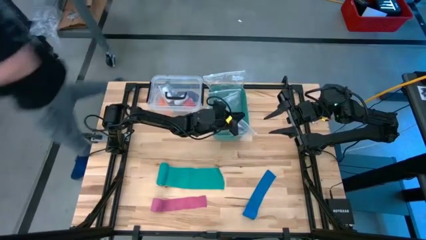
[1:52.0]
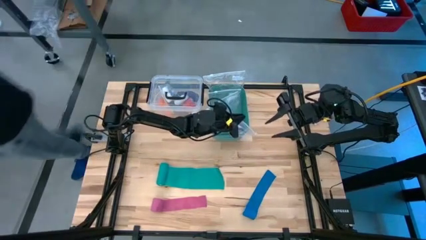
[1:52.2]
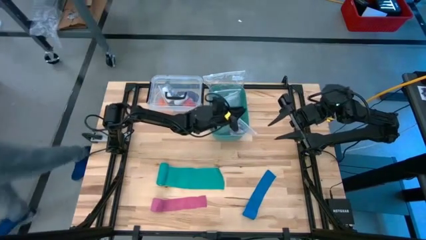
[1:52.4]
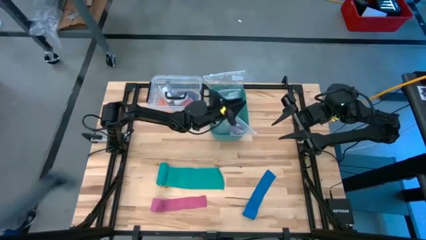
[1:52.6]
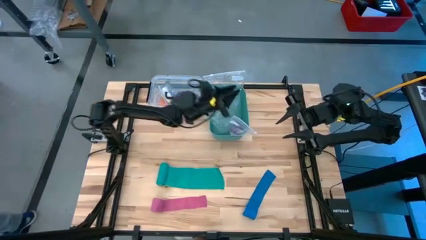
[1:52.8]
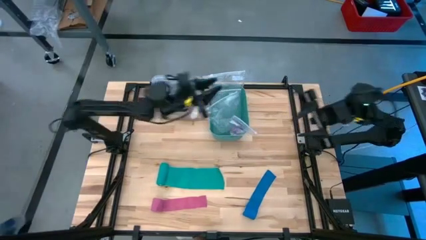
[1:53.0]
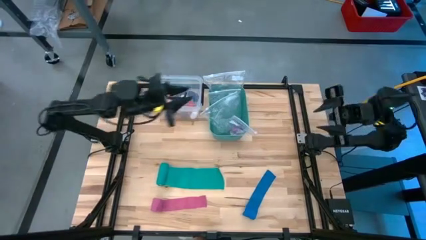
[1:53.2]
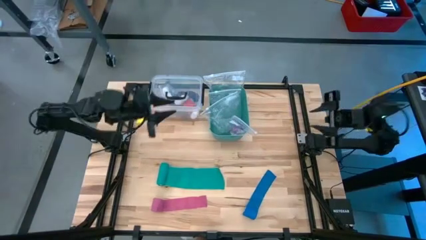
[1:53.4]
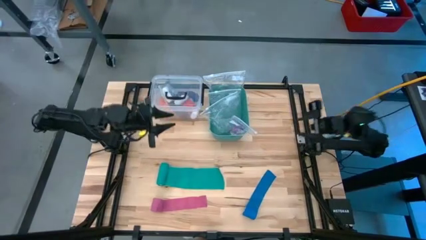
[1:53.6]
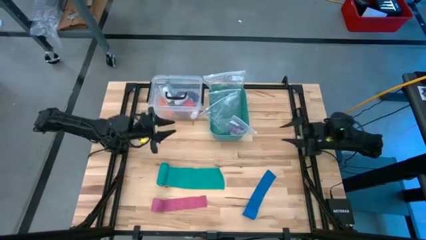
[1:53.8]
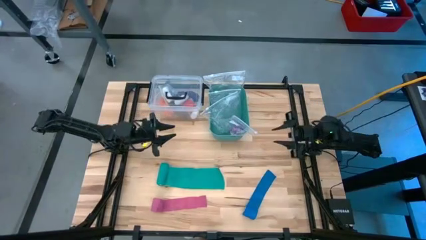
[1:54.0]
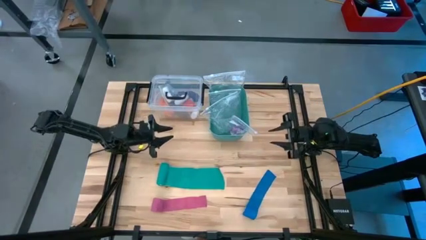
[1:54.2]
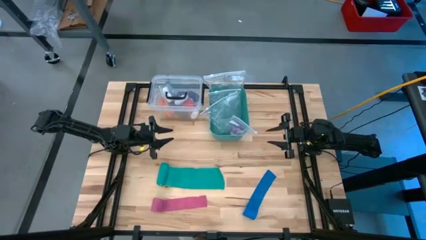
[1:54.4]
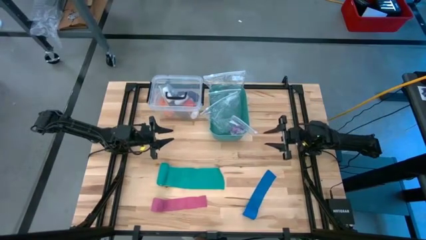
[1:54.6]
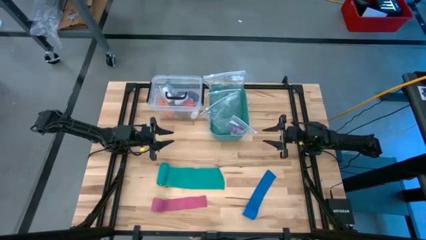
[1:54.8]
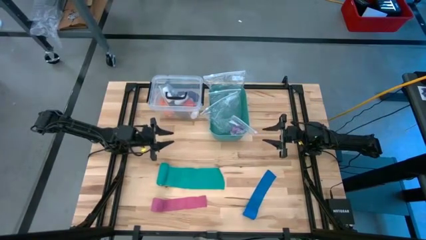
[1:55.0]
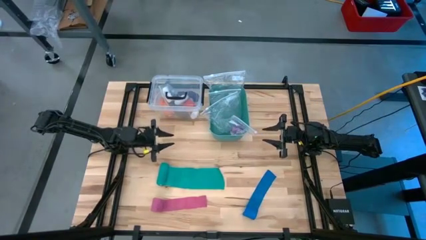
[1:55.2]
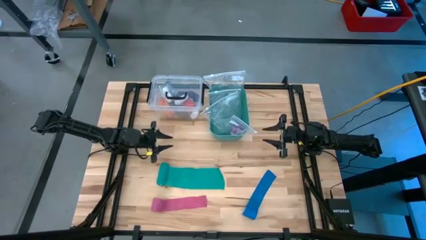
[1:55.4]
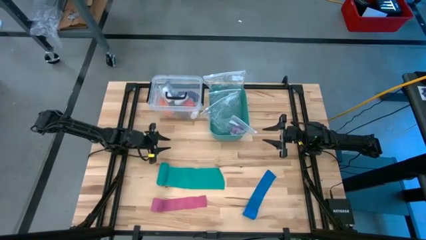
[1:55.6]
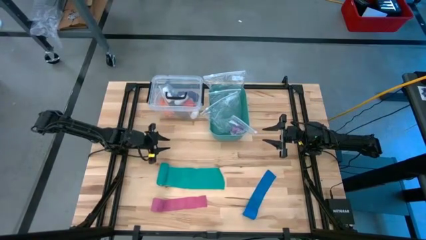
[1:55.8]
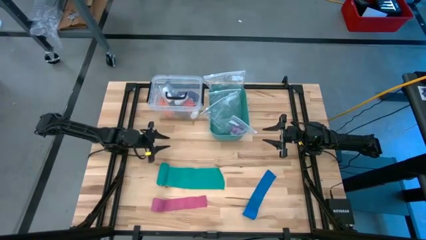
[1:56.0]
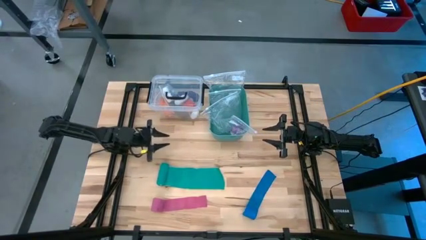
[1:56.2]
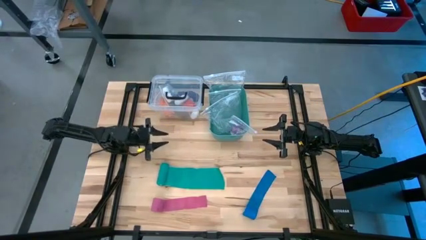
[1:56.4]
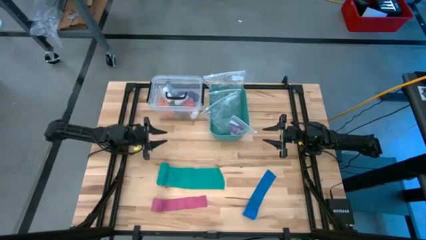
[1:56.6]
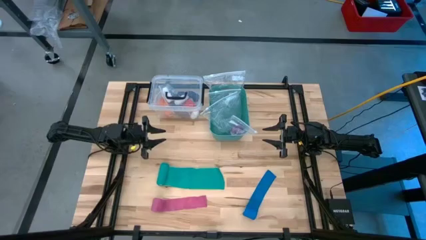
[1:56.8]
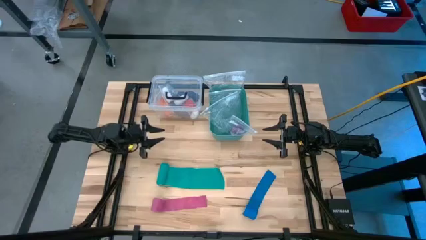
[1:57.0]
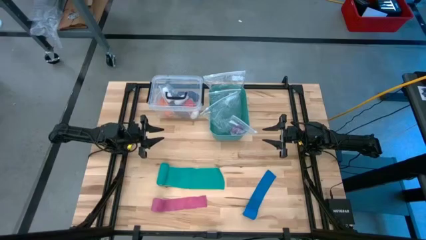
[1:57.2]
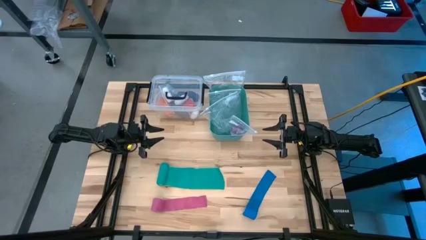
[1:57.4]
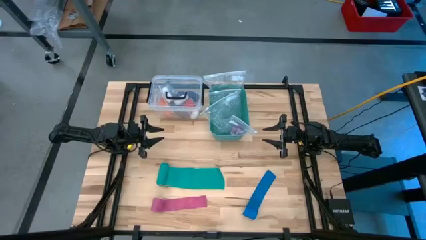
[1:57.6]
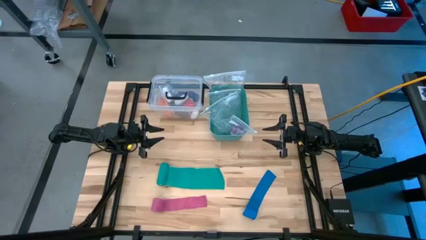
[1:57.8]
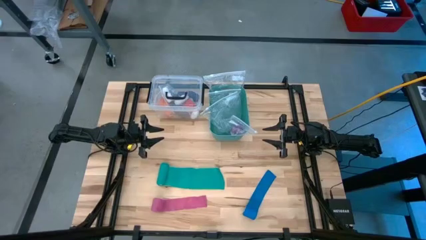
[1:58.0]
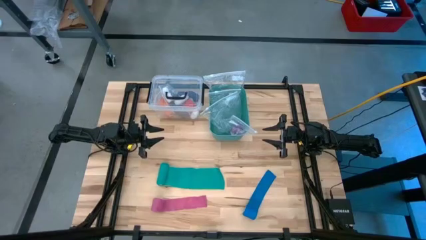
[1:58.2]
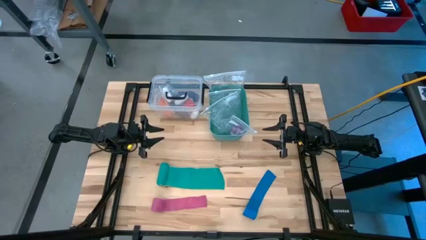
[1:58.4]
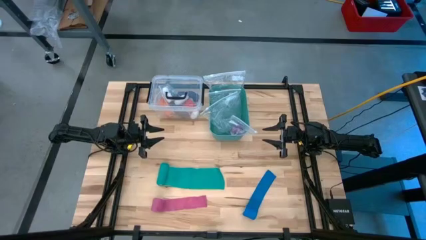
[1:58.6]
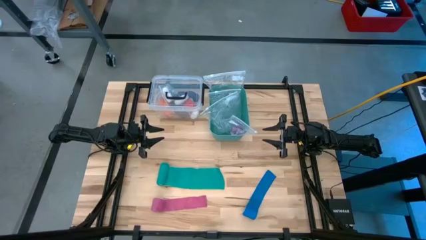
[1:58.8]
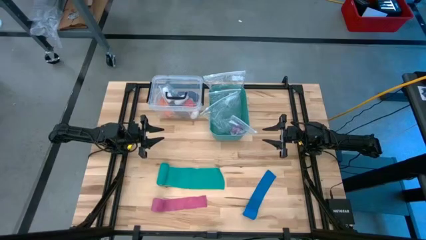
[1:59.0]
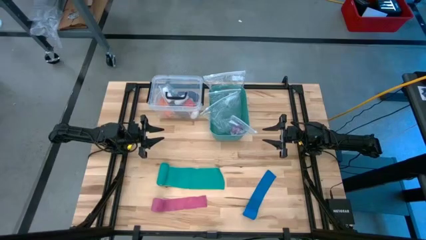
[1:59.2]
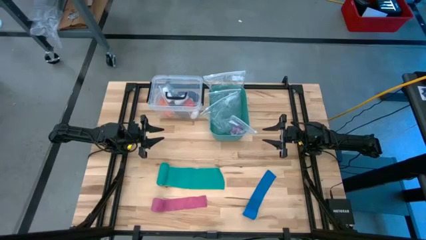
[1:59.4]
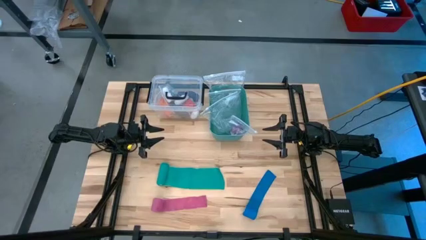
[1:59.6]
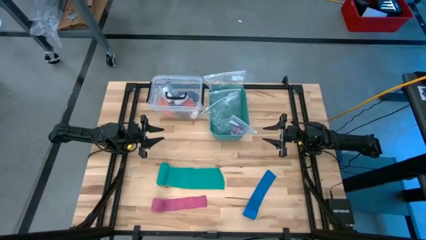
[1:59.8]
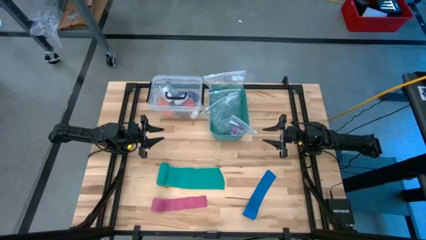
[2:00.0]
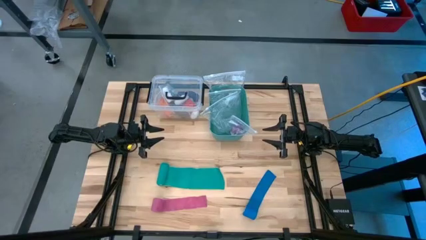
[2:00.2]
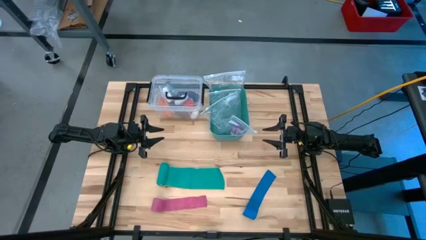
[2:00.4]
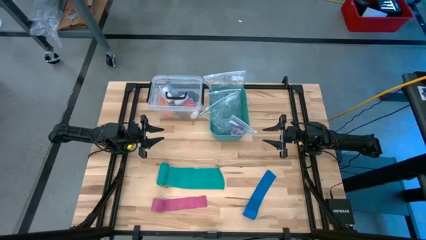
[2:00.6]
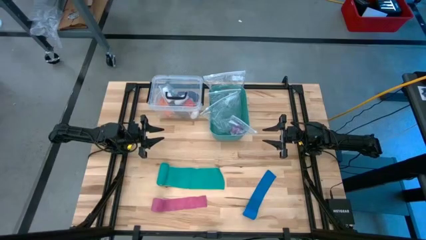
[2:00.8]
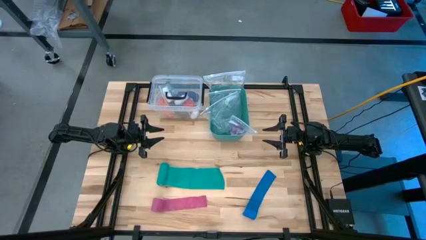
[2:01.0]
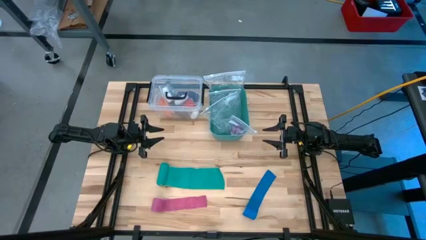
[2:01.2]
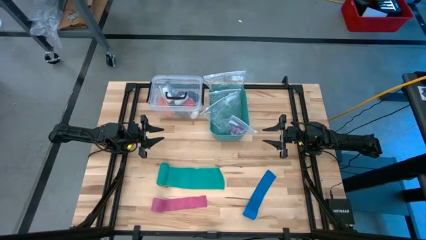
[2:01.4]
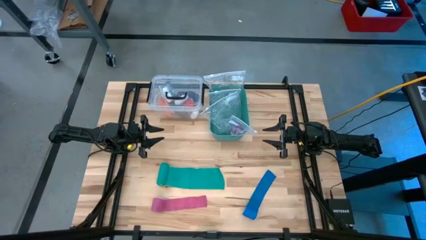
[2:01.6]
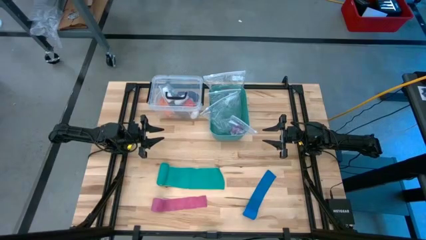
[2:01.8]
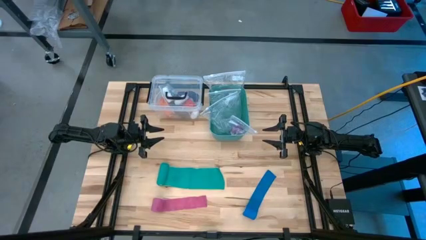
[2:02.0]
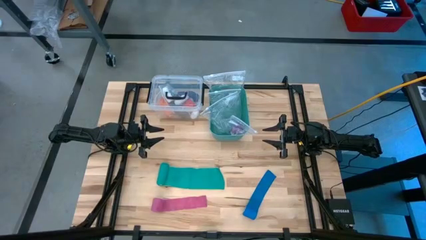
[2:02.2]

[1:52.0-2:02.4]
Task: Roll bandage
Return to Home Position

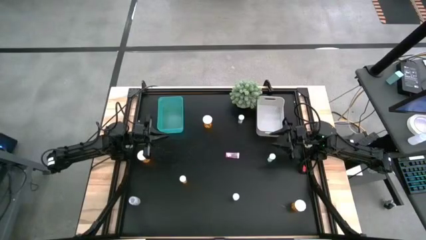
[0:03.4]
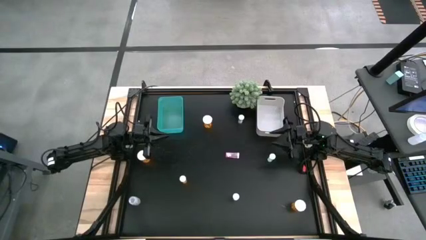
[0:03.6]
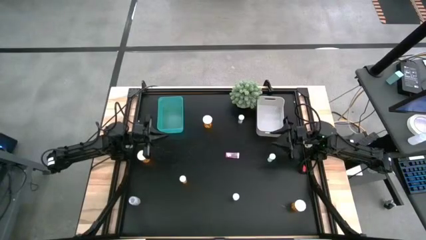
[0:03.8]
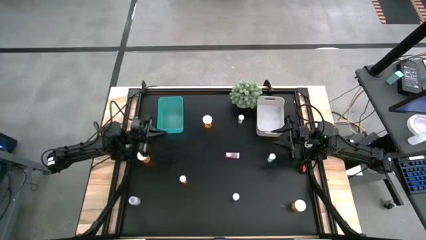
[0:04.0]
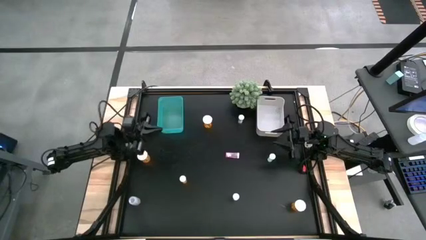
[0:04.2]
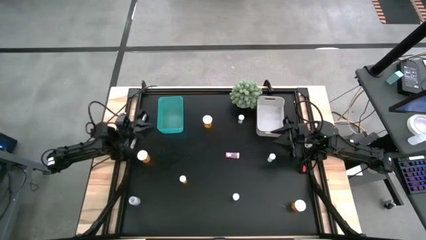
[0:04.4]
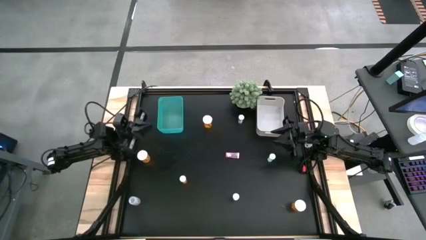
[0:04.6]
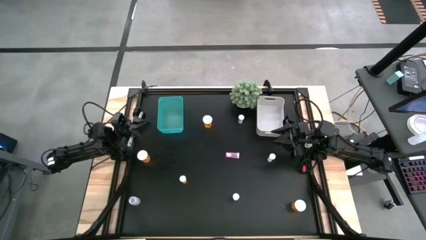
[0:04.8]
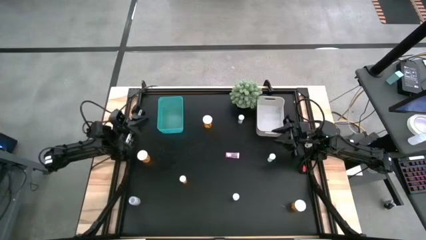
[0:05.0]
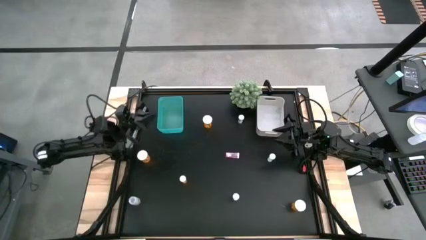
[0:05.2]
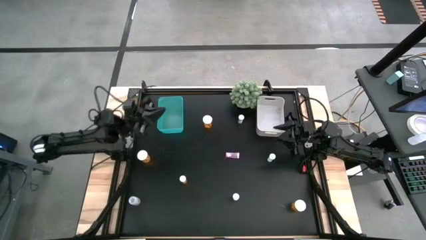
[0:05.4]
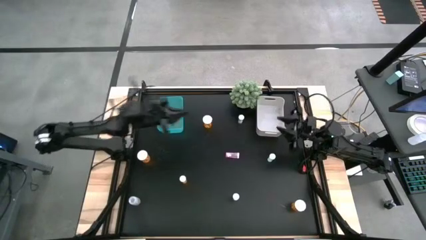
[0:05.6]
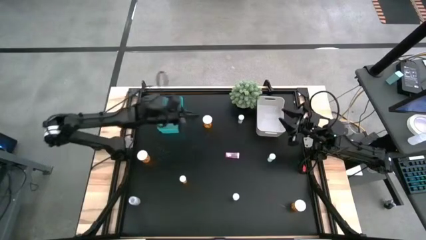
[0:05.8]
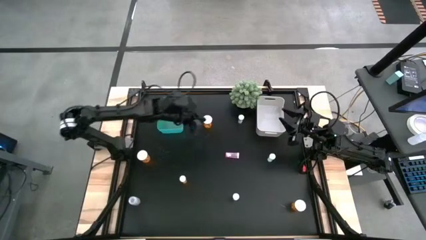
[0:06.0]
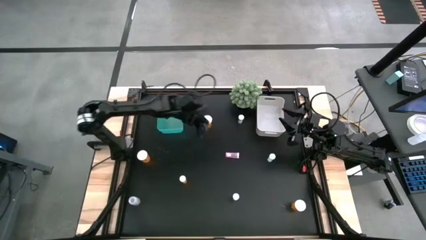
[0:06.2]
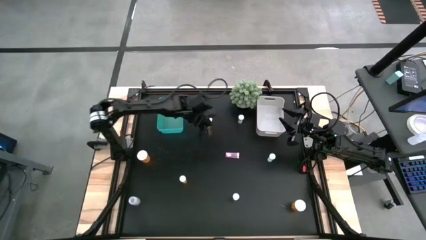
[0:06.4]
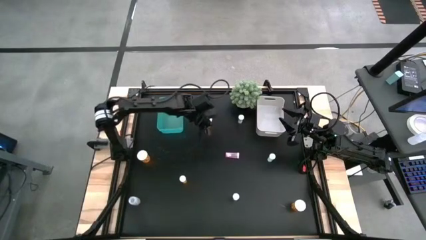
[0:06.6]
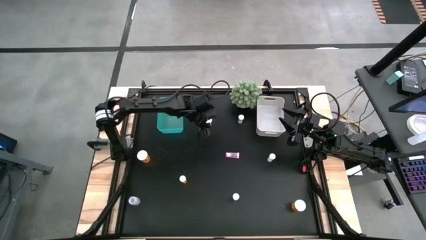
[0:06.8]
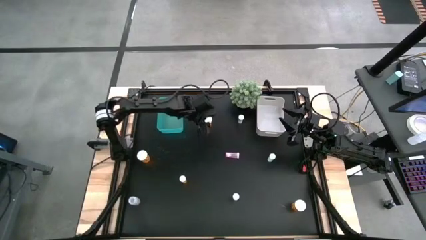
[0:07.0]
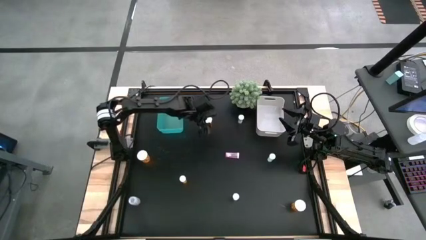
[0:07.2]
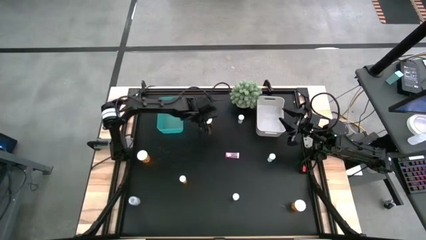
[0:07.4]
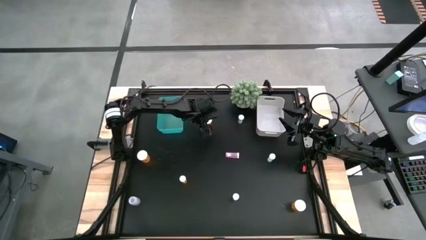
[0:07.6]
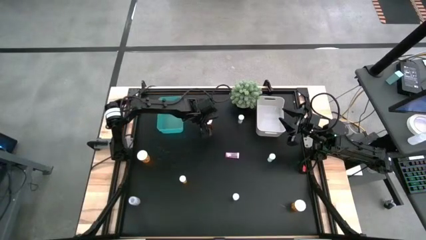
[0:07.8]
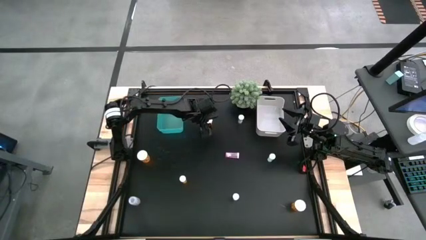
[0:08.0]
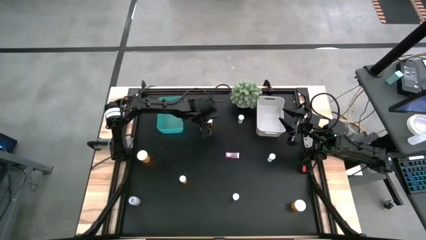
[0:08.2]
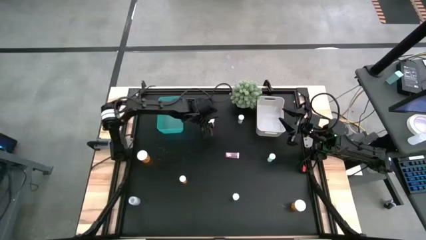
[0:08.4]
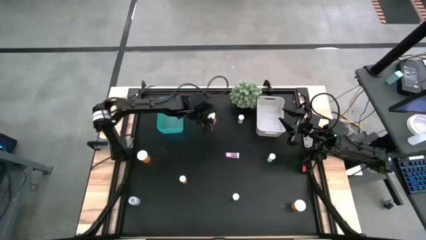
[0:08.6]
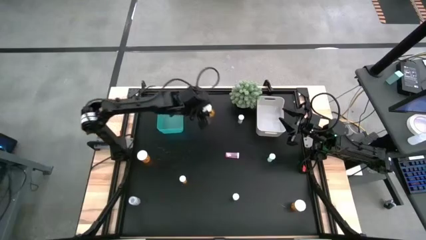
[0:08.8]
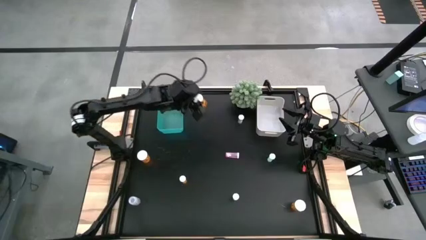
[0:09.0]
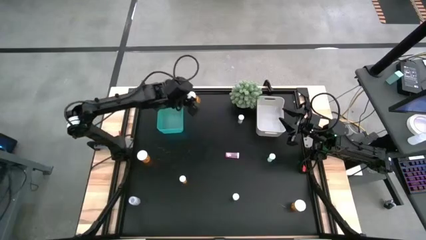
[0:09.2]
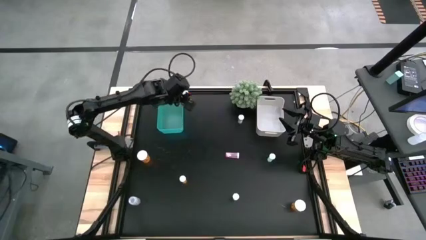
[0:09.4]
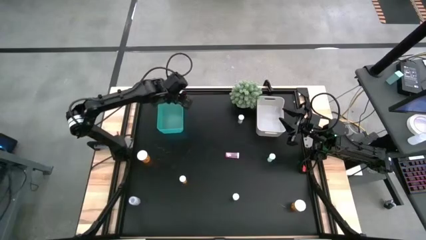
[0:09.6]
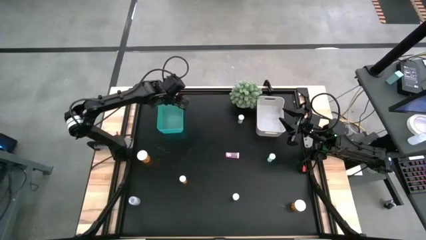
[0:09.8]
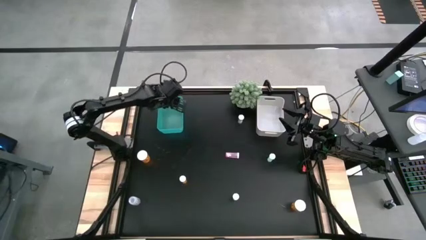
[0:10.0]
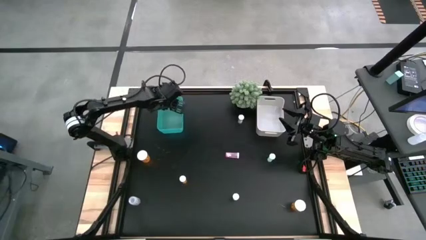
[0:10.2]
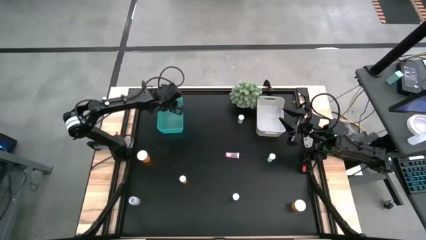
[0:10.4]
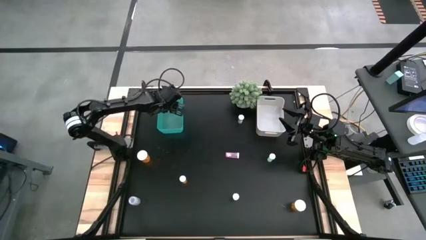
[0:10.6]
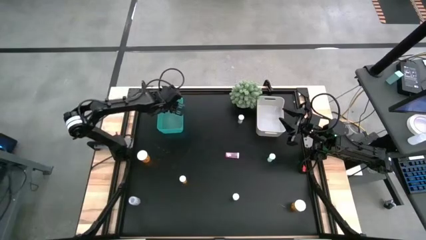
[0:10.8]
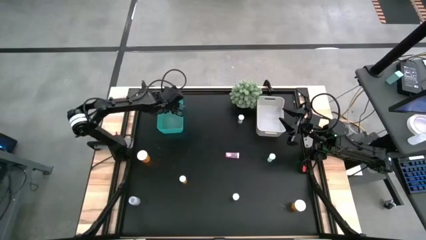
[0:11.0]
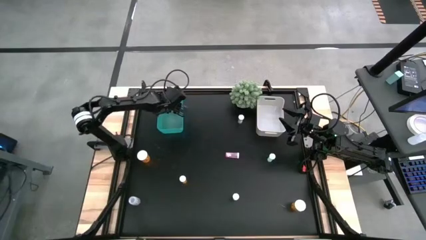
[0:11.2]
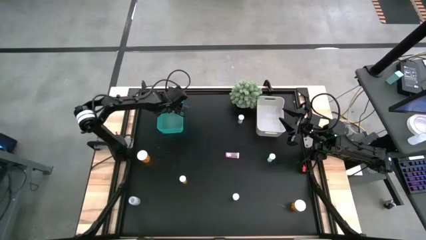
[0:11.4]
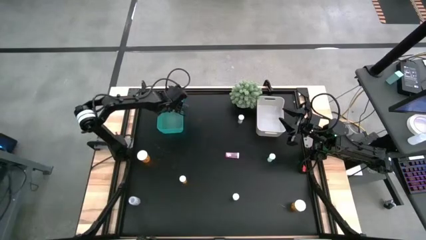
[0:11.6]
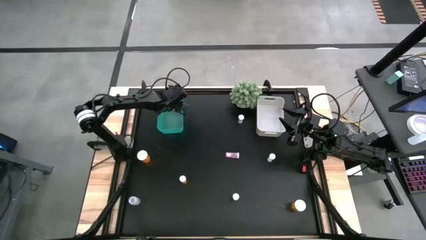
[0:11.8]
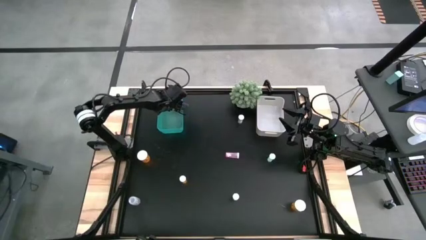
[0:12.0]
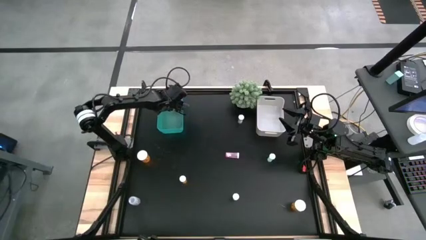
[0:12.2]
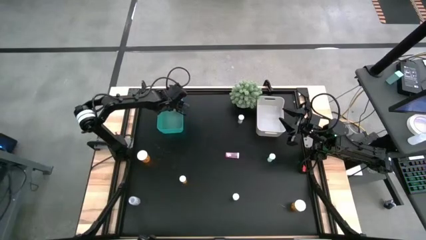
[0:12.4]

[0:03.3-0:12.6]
Task: Pick and place medicine bottles into bin by pill shape (circle, oval)
Put the top orange capsule bottle into the green bin
